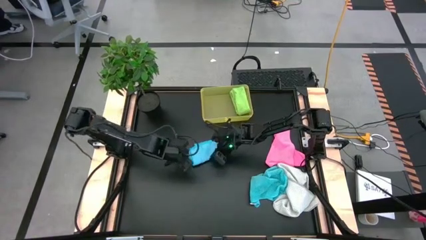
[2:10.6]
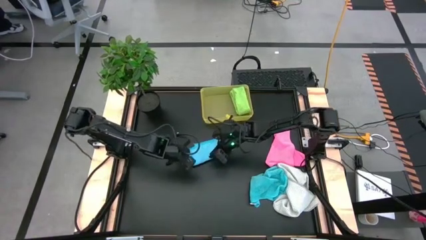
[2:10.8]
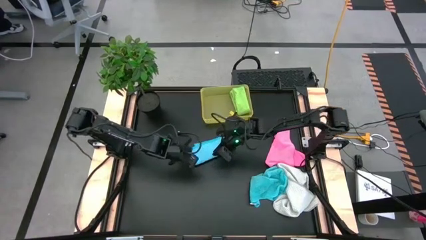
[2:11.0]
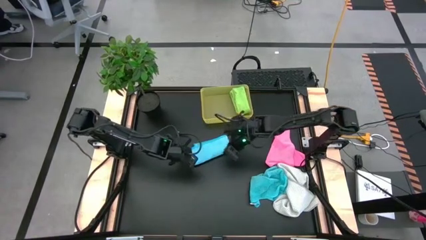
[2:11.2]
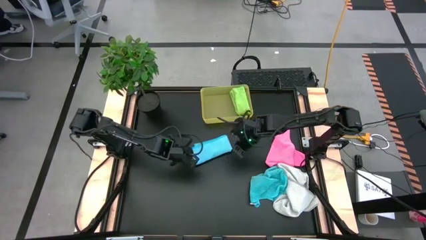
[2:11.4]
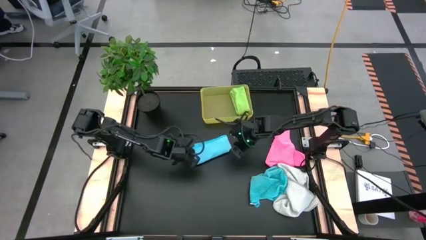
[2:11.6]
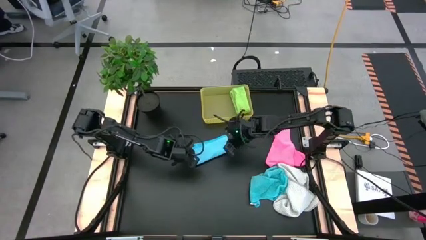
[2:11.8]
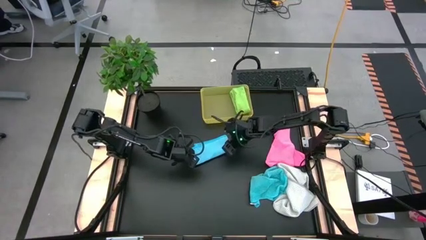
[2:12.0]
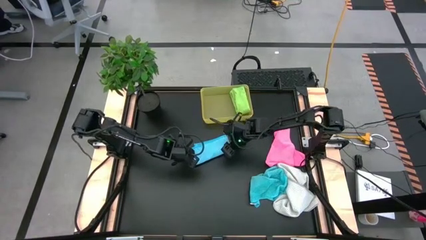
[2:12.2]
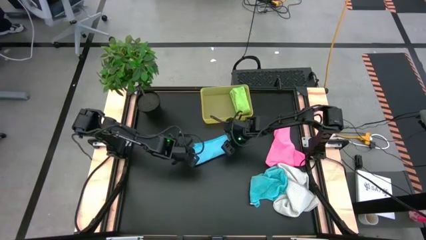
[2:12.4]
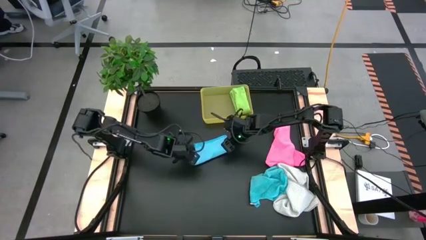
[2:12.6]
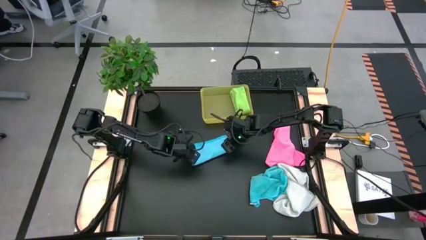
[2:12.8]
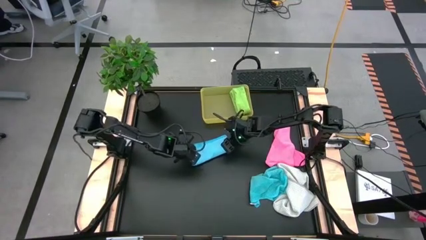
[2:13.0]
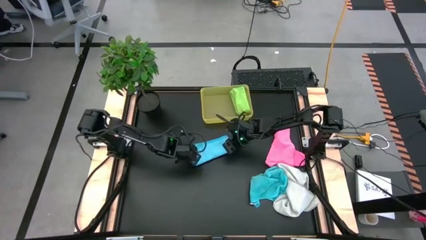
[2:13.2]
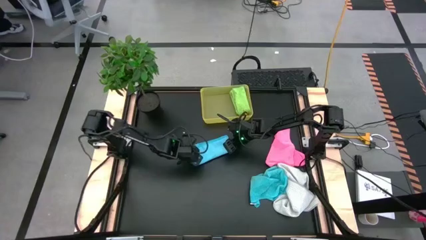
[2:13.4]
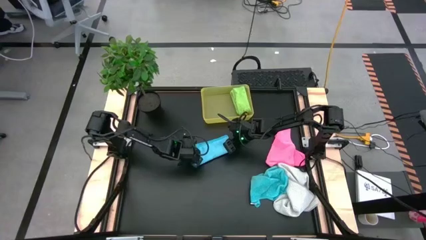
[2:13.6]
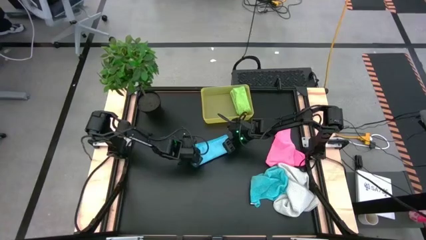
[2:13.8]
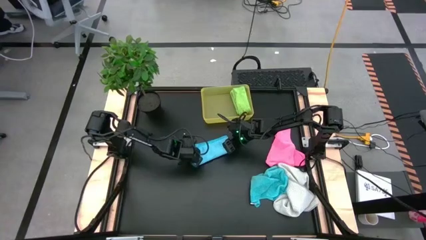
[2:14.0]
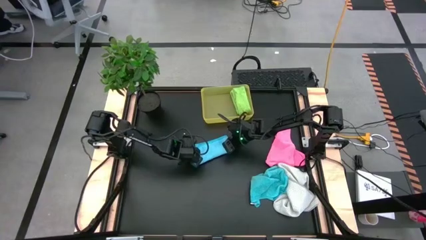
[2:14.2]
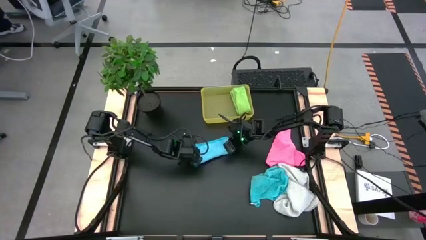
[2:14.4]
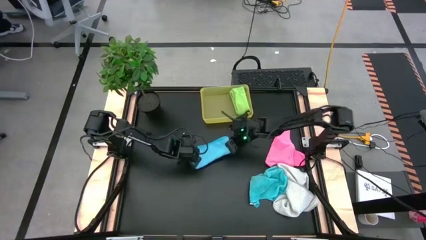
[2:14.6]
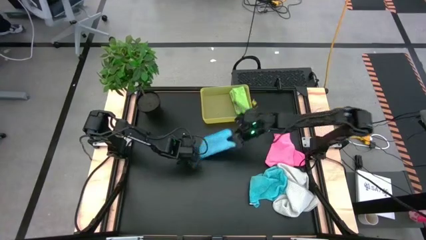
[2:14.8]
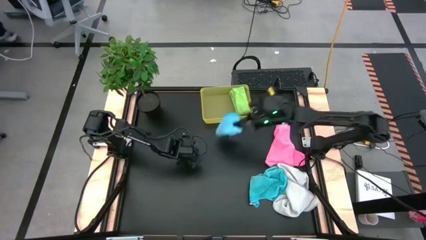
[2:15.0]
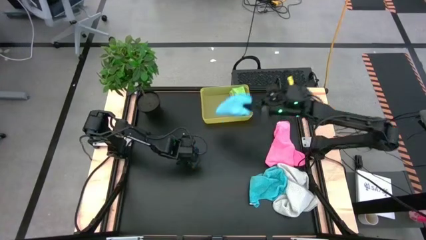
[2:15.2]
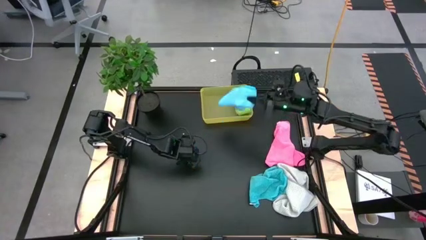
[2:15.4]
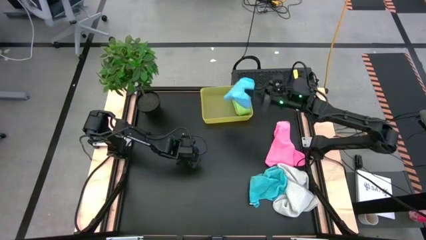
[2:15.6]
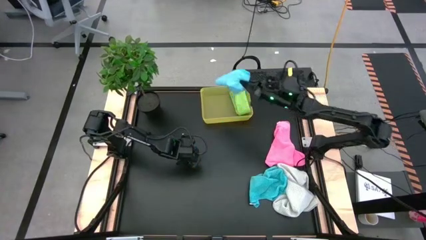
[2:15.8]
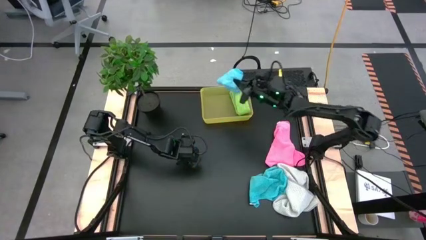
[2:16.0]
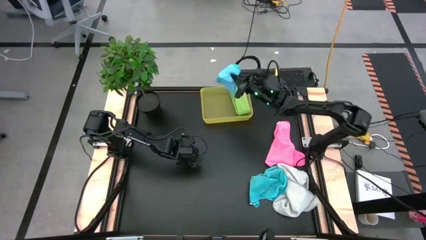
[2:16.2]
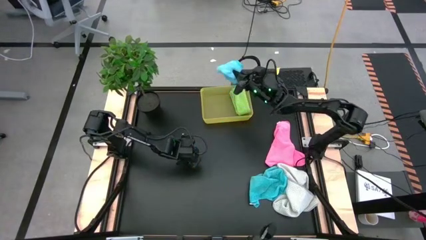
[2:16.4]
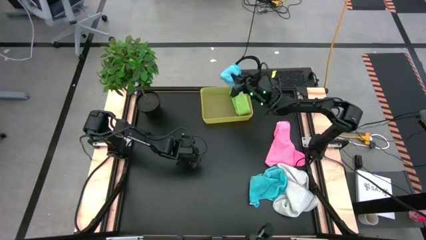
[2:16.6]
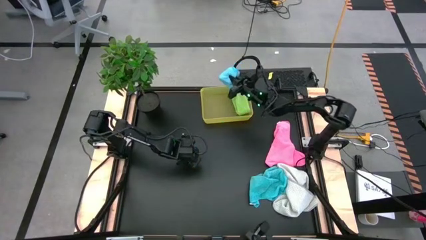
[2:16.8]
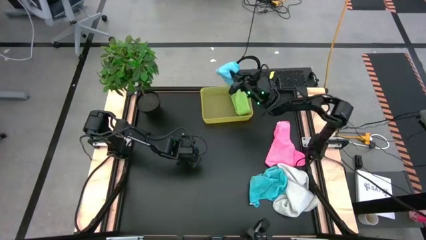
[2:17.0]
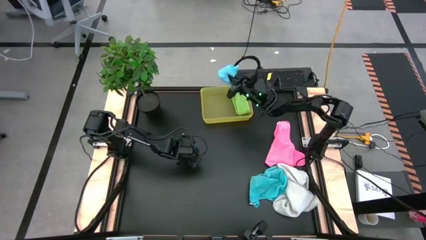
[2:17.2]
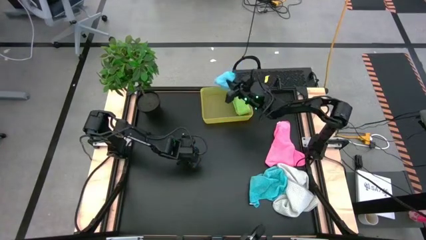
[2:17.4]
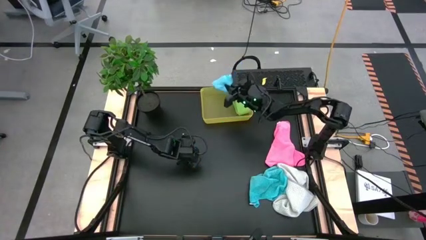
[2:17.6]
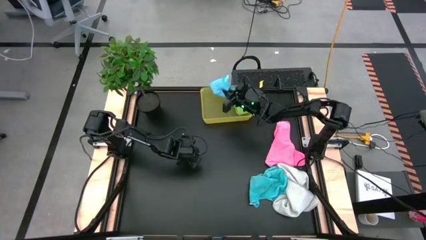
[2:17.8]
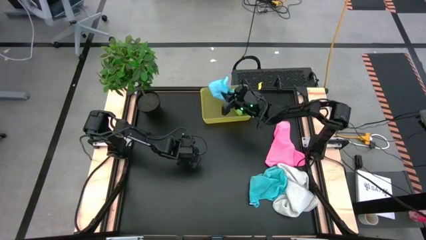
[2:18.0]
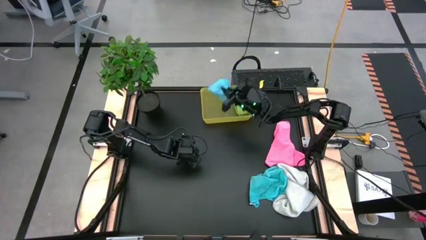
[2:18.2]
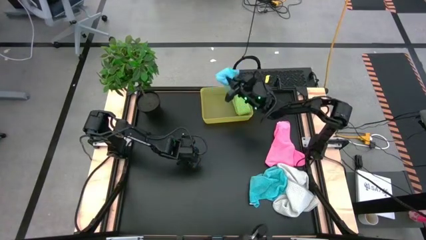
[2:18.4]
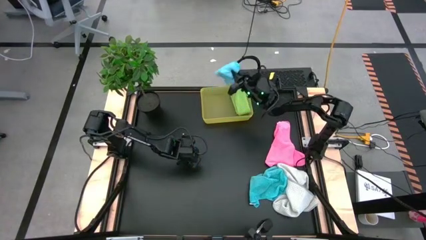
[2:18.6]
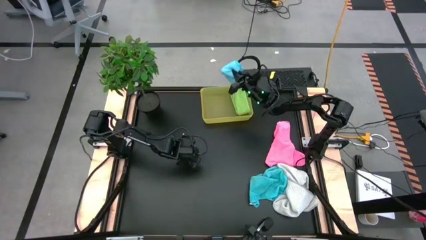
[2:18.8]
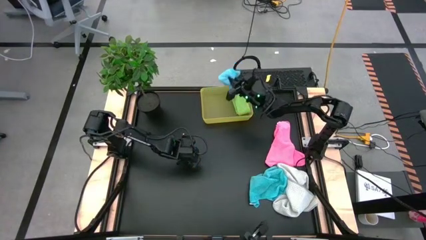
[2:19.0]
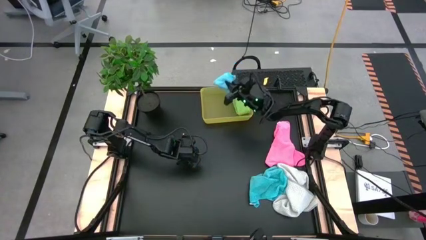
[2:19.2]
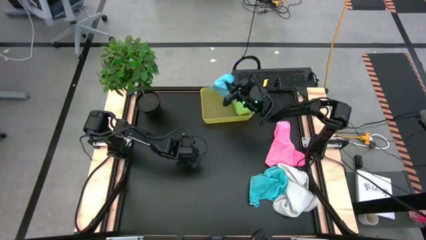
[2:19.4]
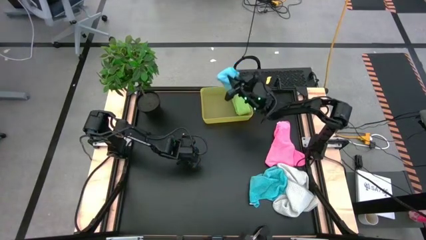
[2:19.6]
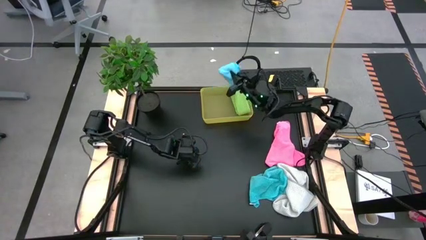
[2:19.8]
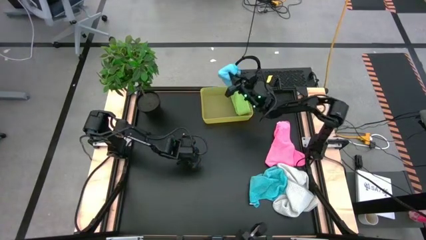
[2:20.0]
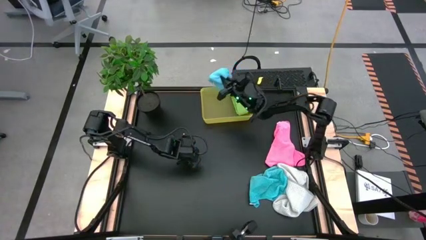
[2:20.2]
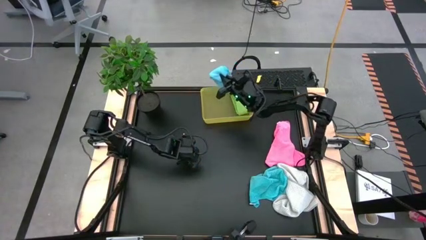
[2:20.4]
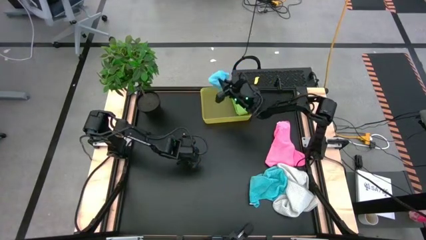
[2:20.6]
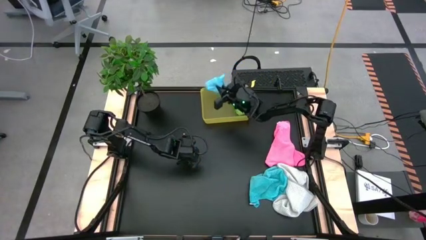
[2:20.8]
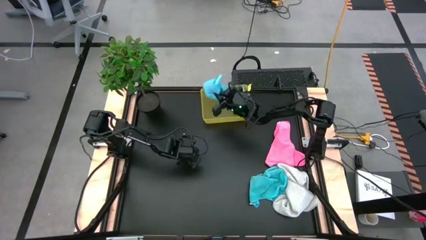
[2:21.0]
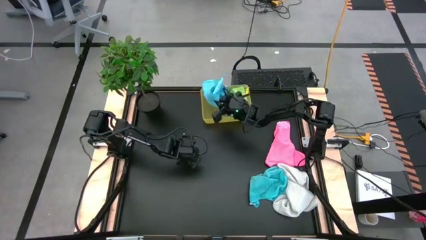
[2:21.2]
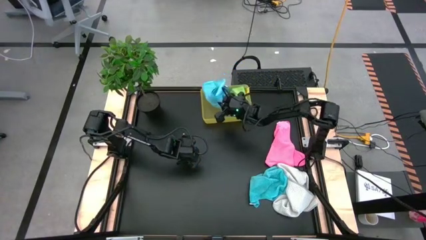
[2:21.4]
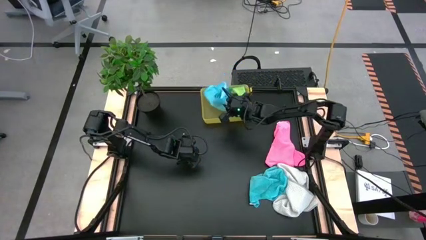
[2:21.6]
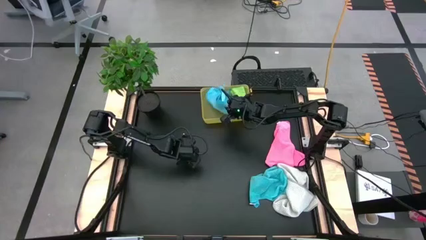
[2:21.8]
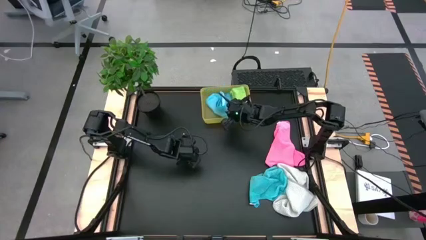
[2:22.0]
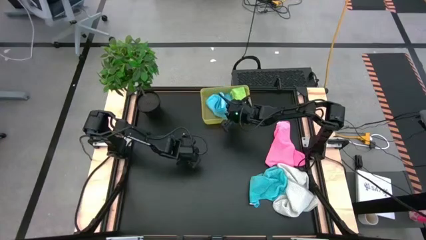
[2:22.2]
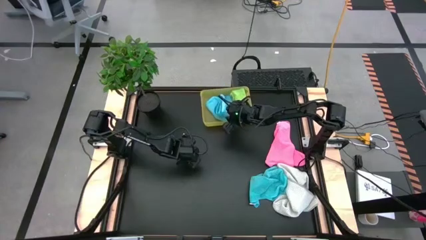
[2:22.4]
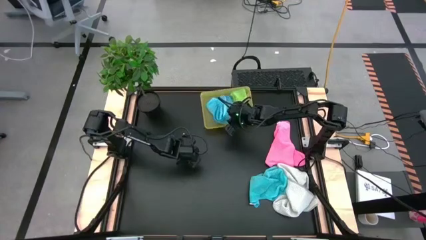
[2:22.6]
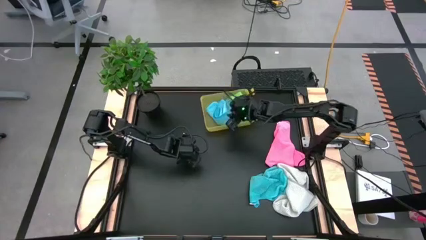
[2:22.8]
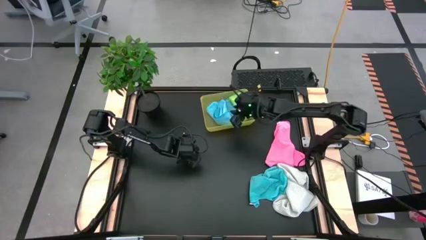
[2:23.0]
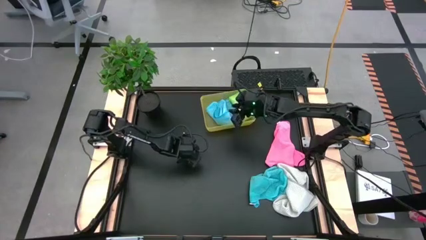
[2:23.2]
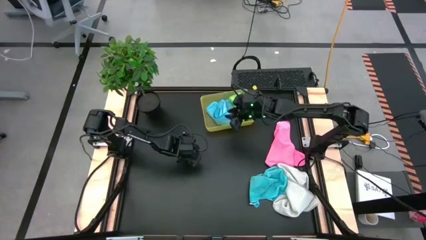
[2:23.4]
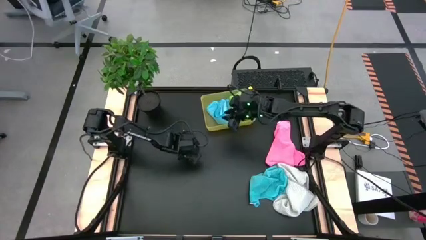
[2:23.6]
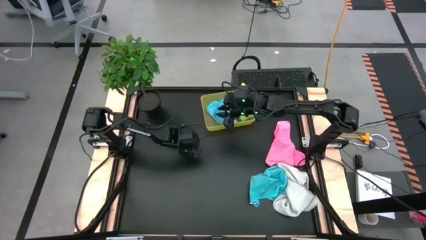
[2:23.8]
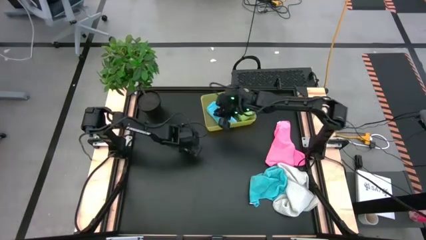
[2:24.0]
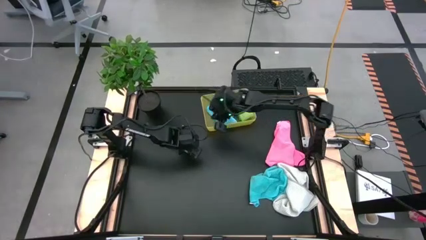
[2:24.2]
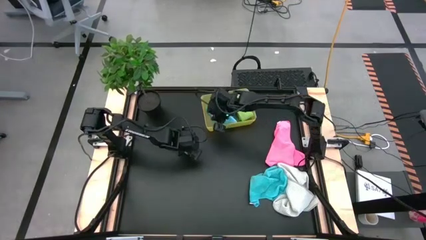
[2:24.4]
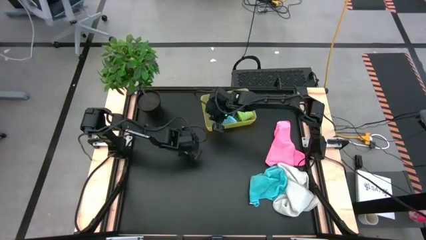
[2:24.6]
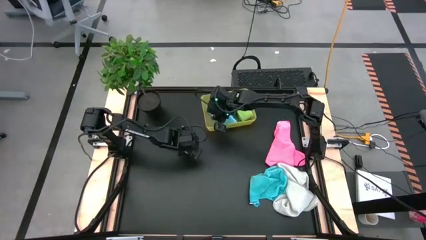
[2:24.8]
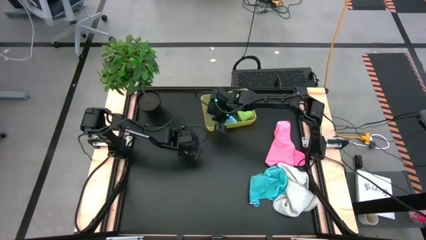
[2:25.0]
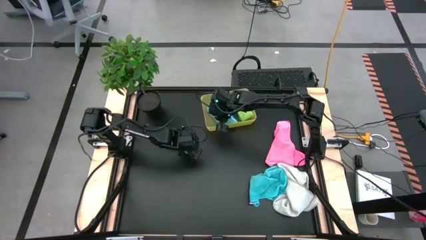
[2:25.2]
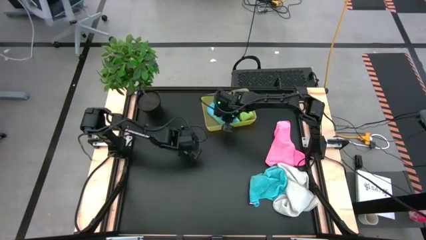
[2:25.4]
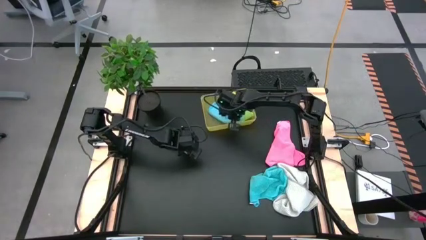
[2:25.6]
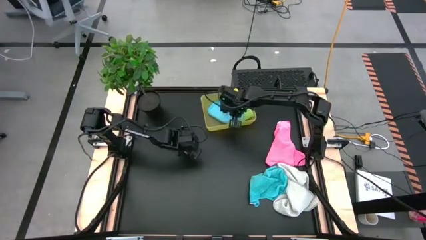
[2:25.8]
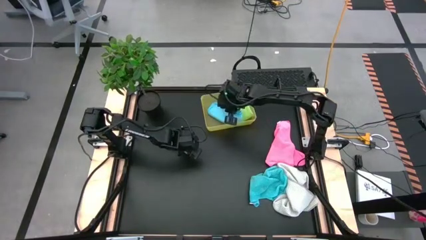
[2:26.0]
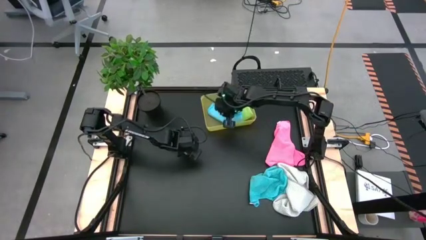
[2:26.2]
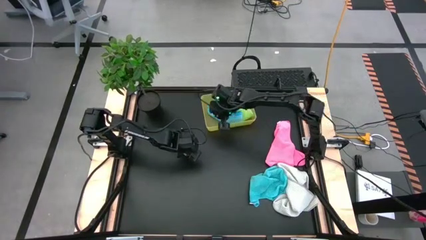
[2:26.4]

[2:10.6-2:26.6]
Task: Fold microfiber towels
Put the left blue microfiber cloth into the bin
